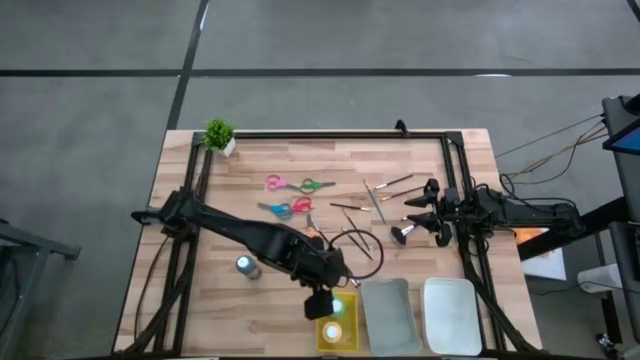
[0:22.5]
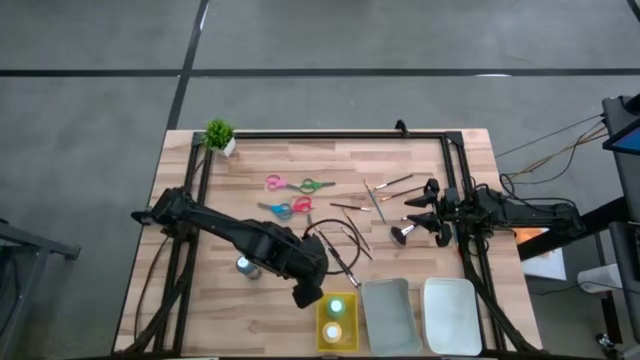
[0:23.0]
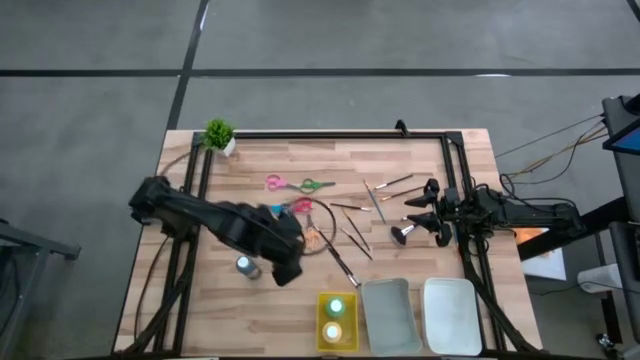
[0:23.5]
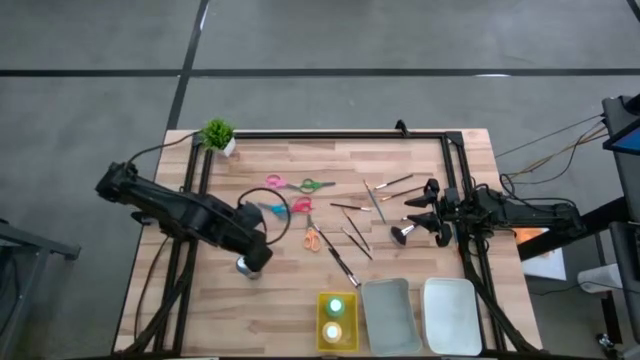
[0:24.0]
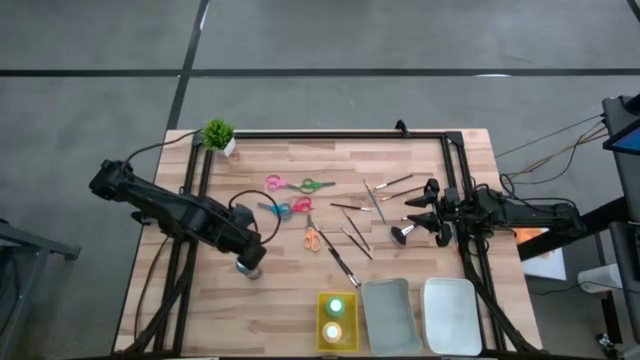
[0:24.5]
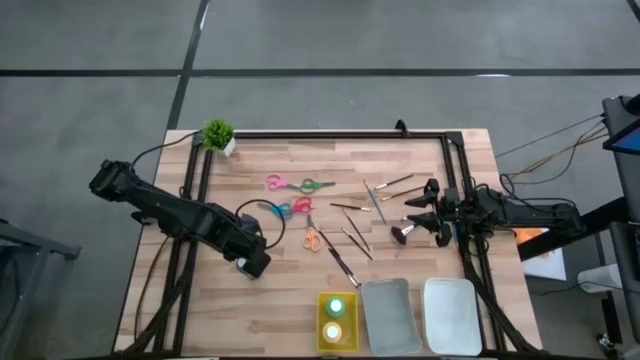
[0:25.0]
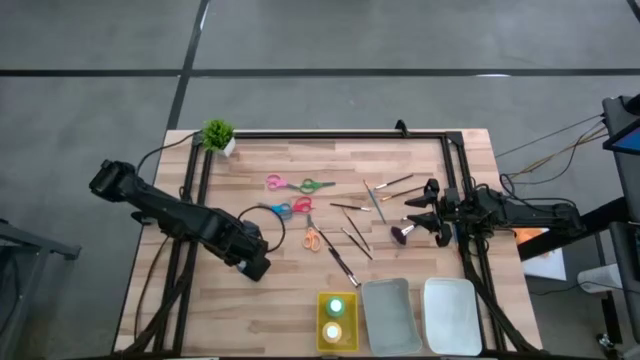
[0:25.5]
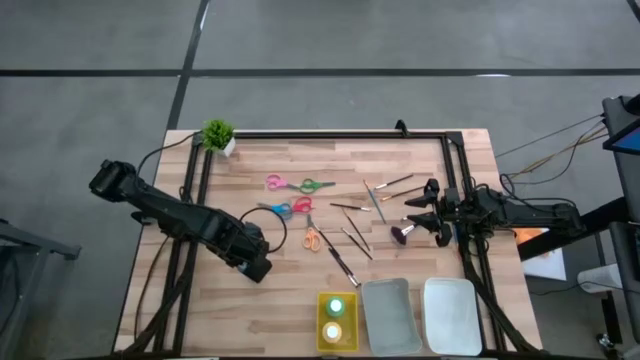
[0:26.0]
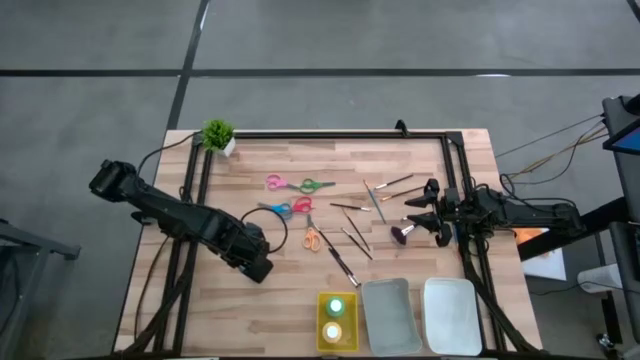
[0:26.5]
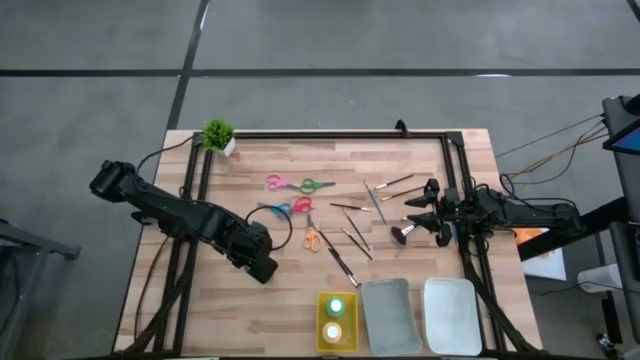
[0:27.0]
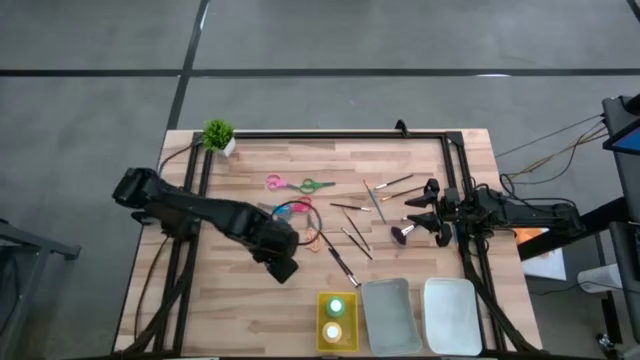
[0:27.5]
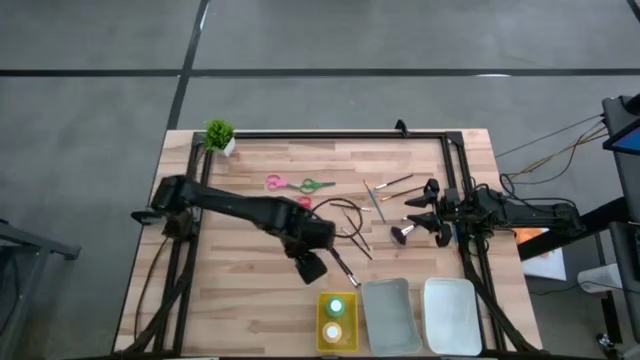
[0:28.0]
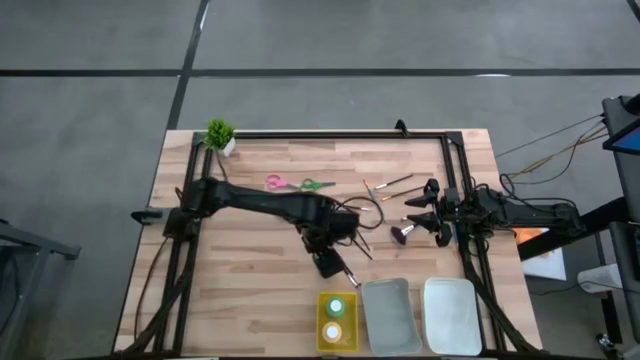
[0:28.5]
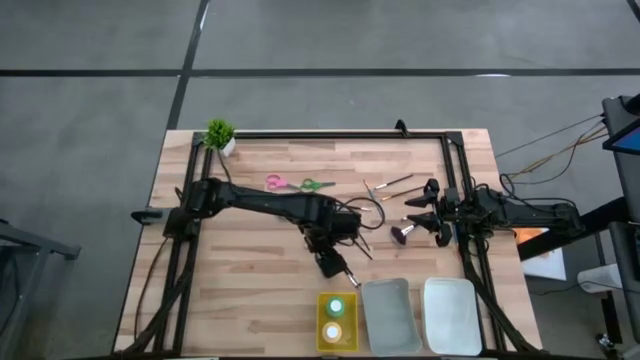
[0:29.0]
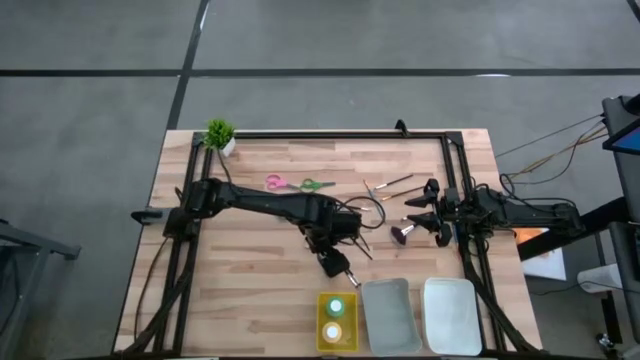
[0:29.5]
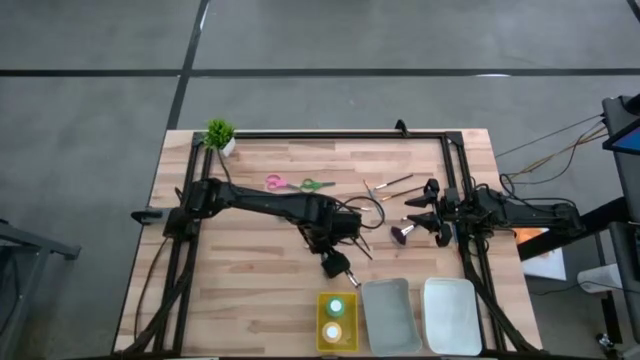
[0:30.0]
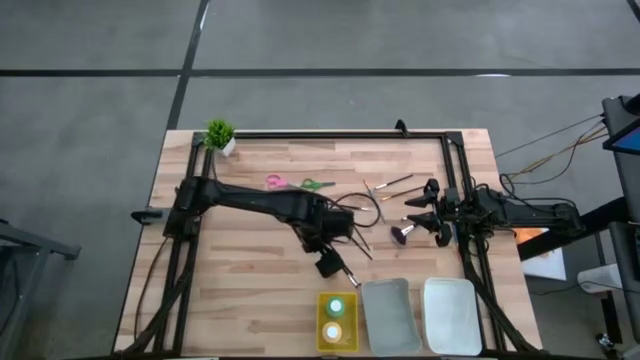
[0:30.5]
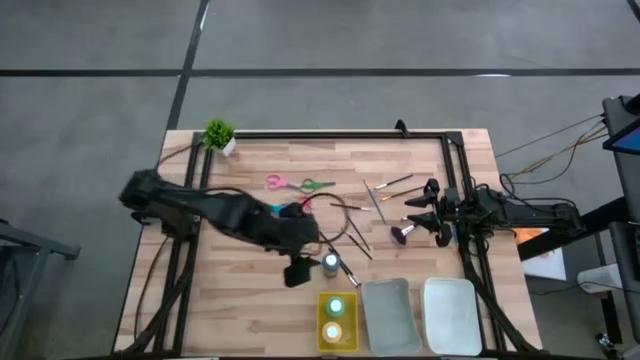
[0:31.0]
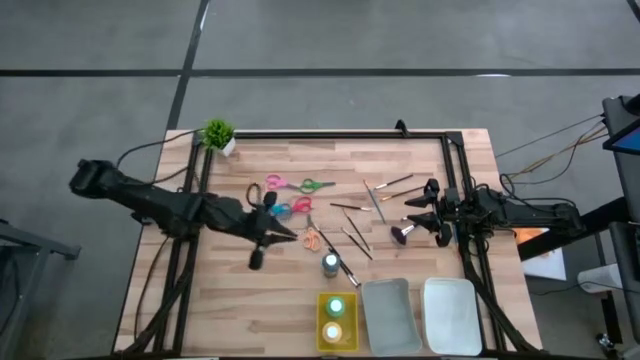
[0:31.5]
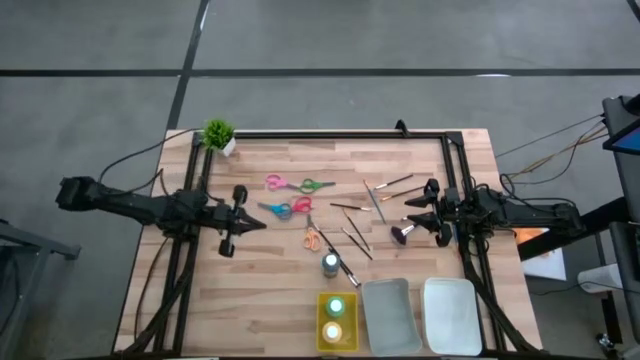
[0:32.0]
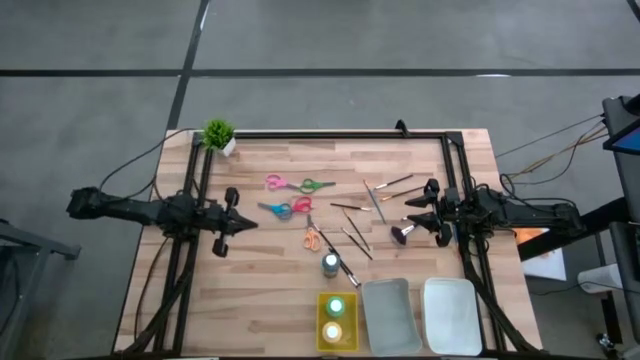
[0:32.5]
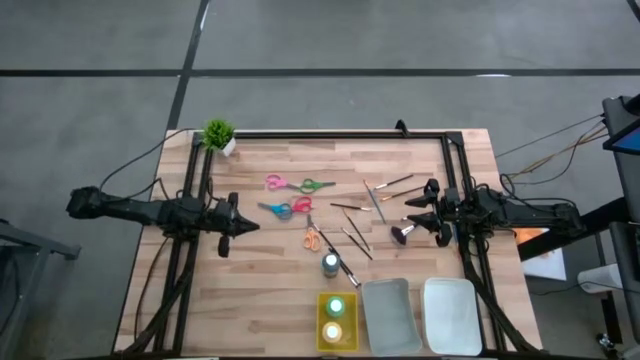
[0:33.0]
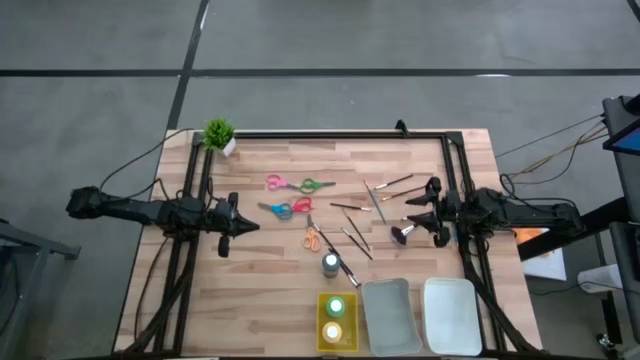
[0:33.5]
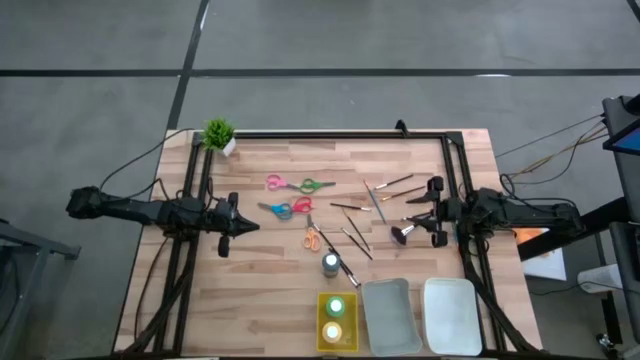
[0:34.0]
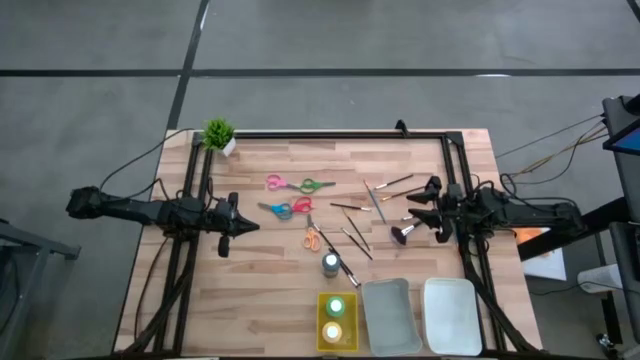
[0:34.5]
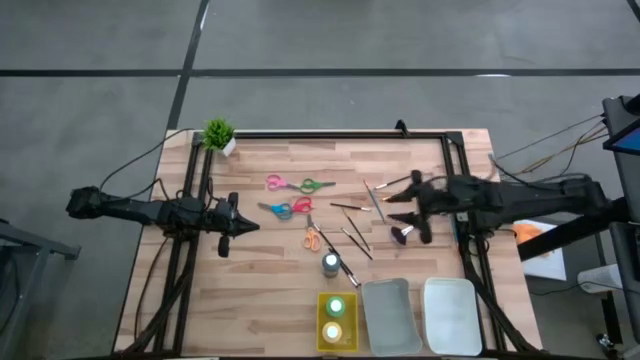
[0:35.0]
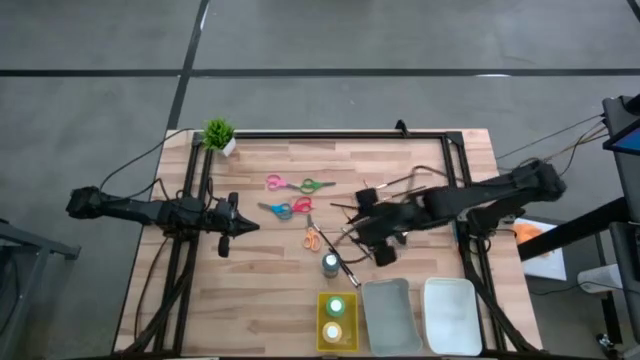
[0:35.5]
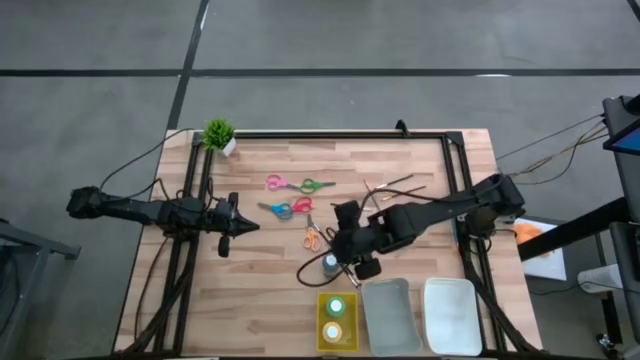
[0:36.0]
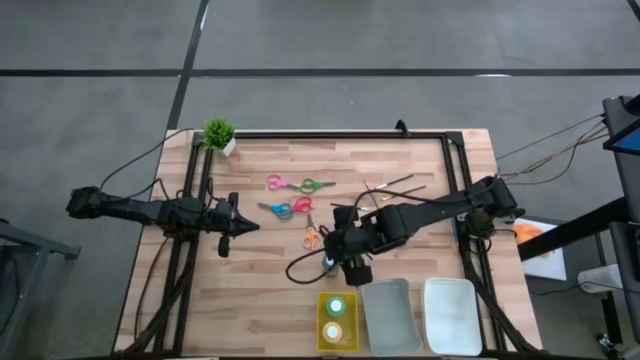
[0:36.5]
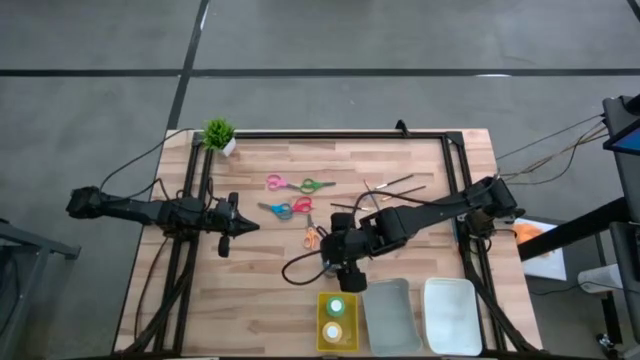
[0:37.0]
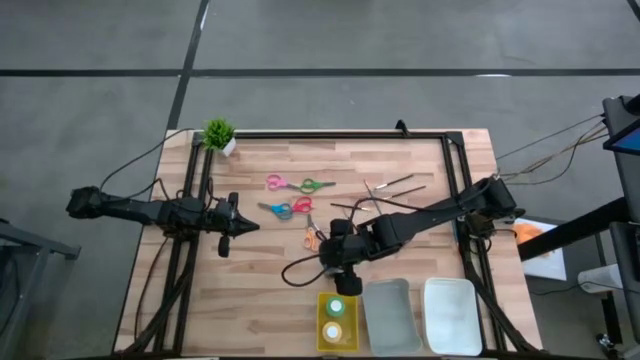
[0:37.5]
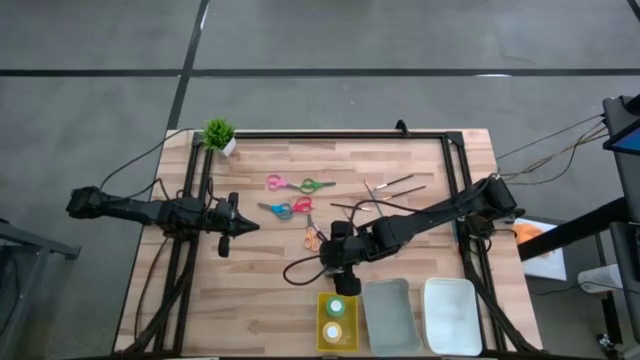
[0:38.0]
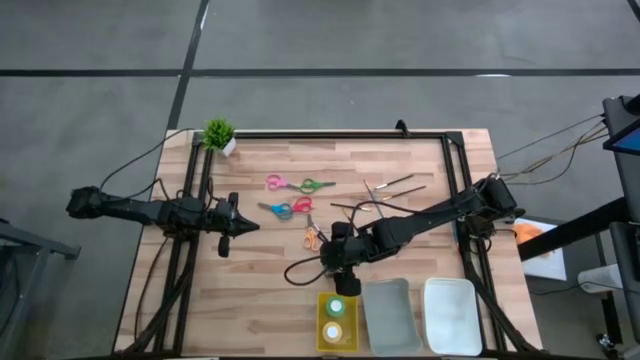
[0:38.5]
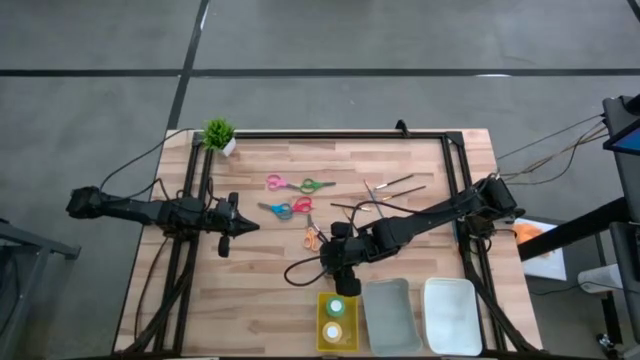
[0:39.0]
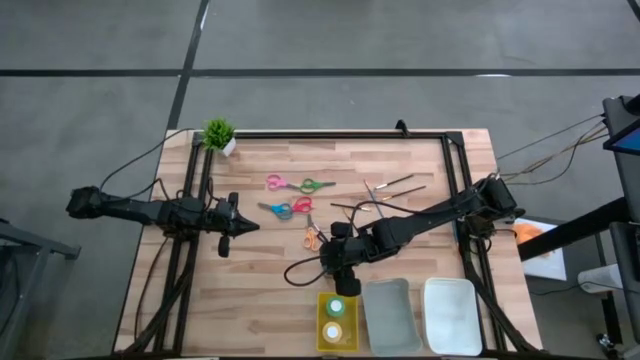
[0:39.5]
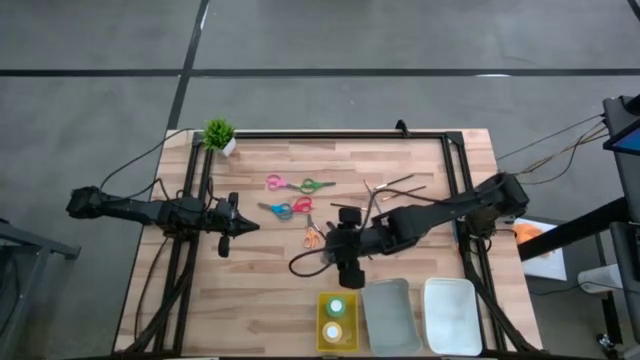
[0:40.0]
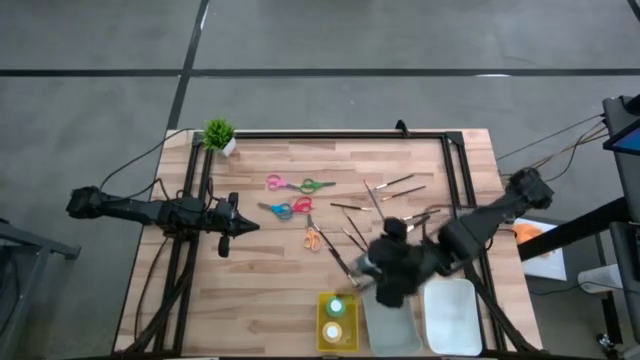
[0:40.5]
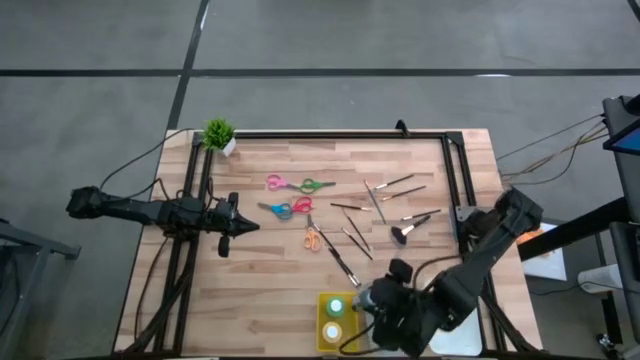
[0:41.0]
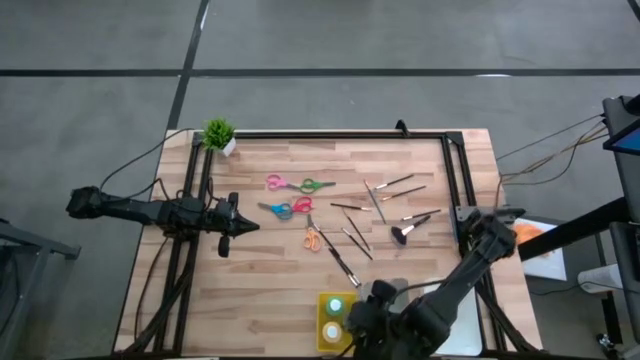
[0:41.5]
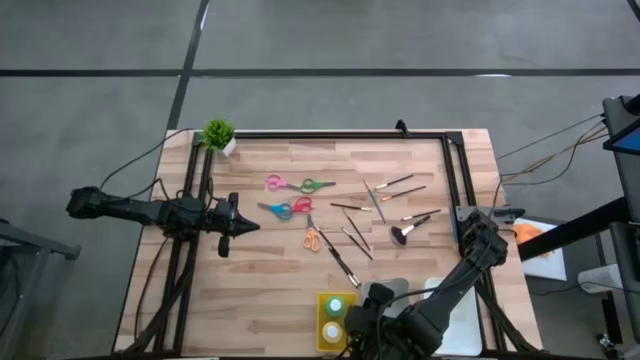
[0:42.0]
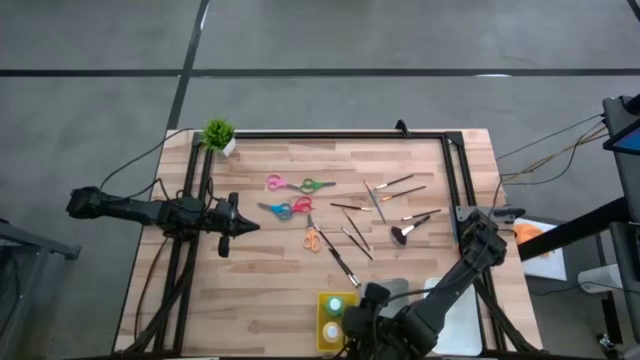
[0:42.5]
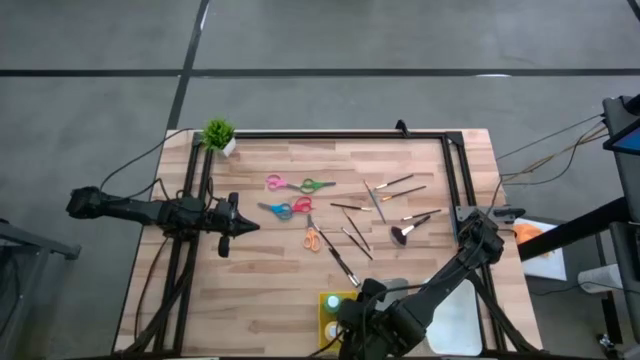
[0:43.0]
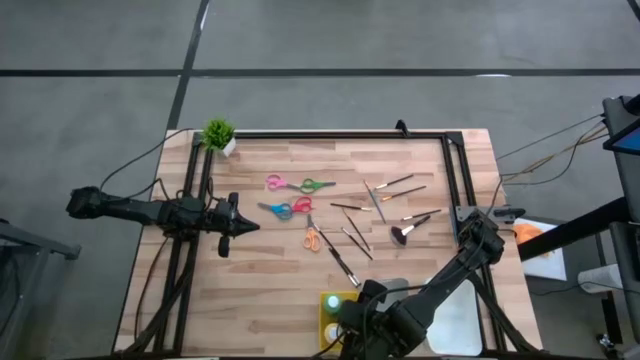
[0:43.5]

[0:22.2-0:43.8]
Task: Pick & Place Paint Supplies
Put the blue paint bottle into the yellow bin
